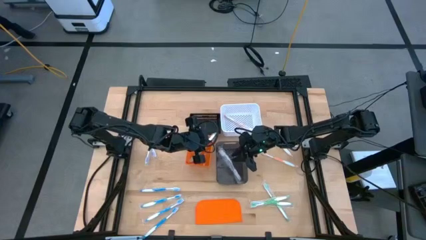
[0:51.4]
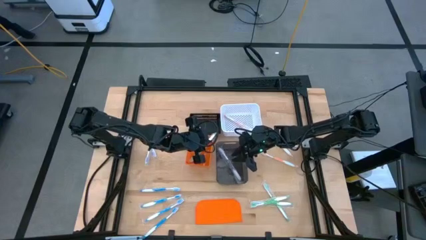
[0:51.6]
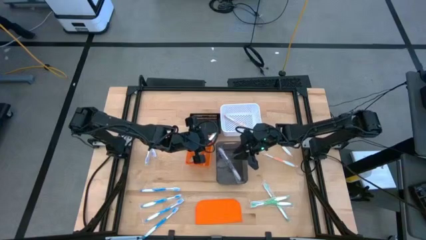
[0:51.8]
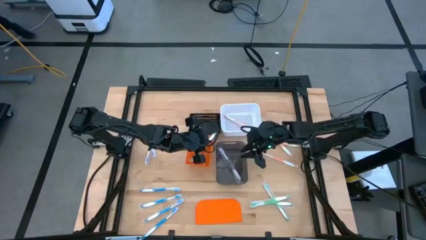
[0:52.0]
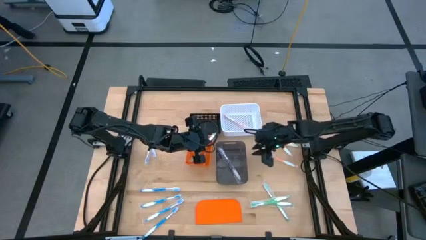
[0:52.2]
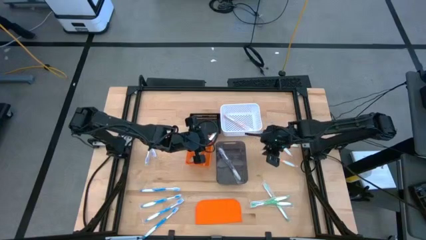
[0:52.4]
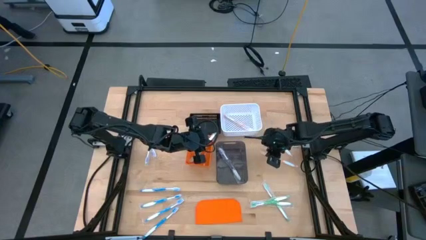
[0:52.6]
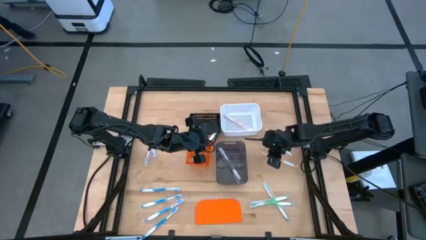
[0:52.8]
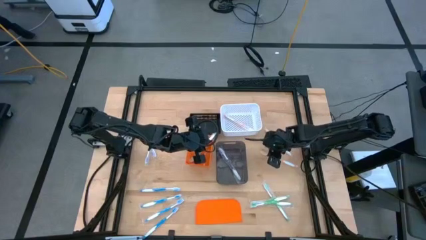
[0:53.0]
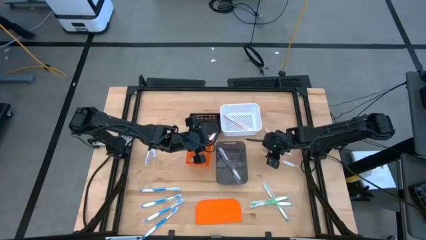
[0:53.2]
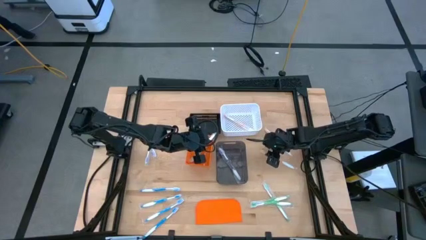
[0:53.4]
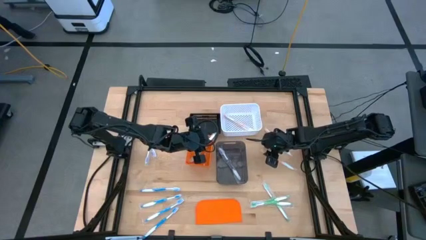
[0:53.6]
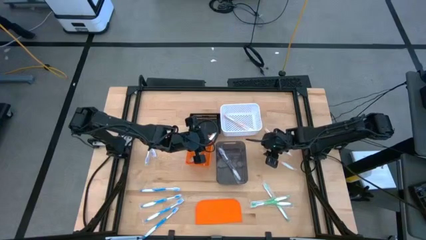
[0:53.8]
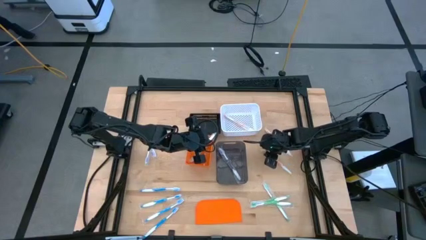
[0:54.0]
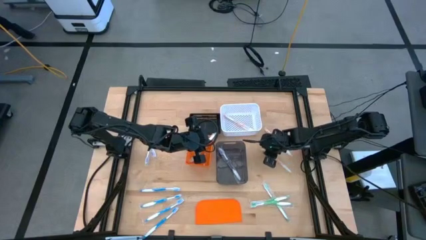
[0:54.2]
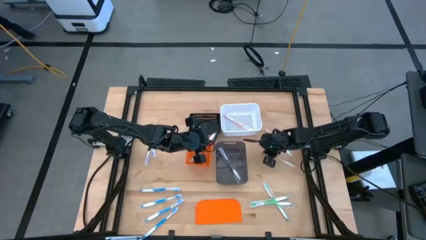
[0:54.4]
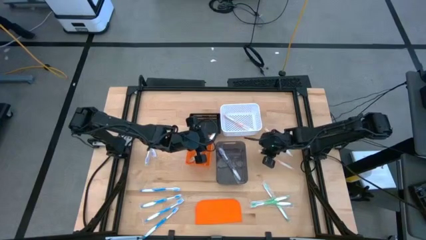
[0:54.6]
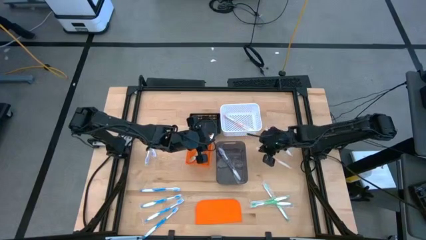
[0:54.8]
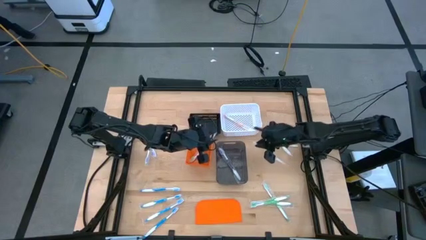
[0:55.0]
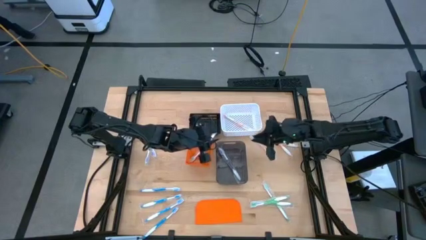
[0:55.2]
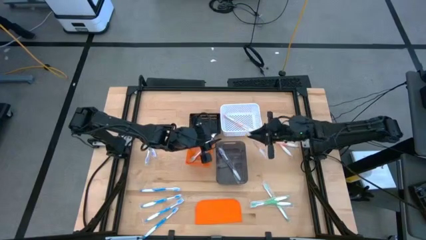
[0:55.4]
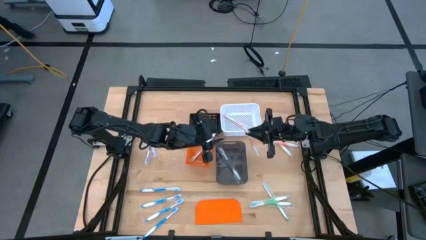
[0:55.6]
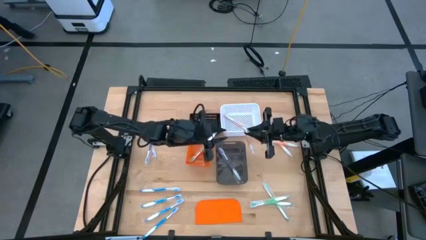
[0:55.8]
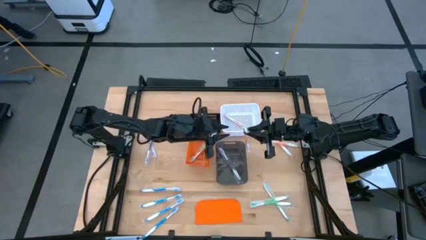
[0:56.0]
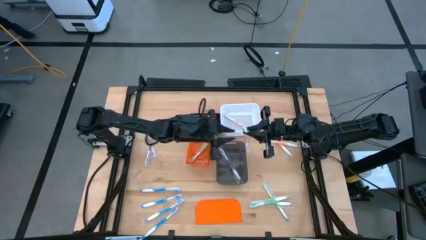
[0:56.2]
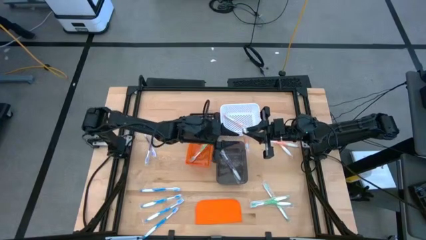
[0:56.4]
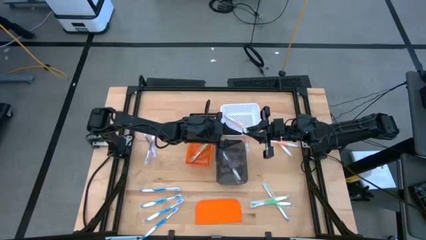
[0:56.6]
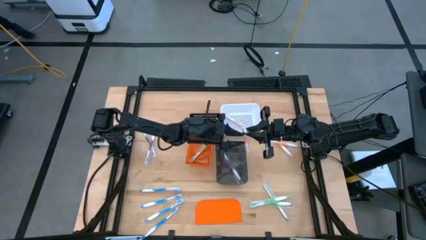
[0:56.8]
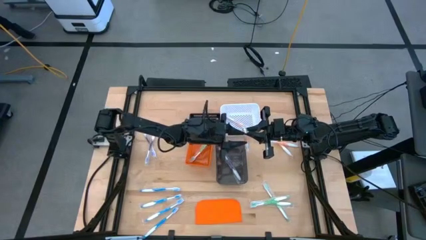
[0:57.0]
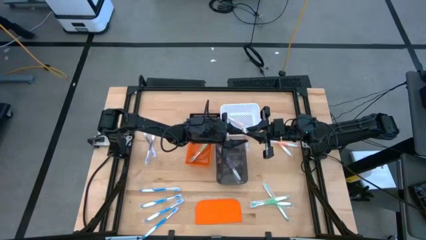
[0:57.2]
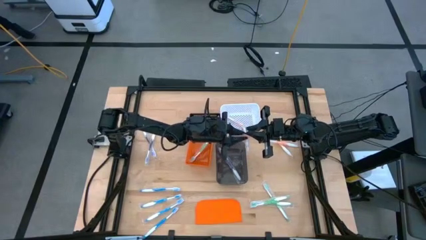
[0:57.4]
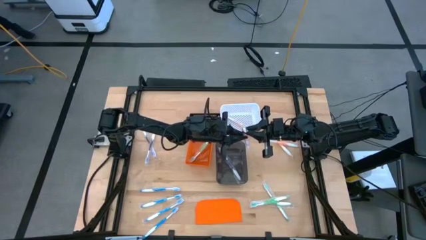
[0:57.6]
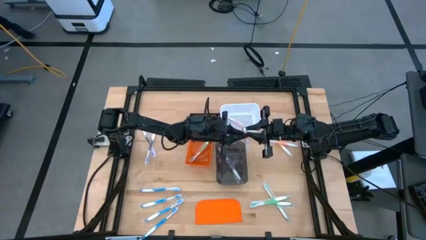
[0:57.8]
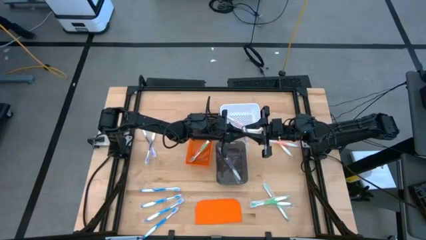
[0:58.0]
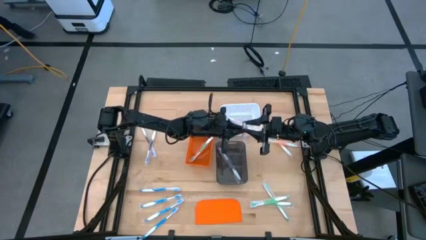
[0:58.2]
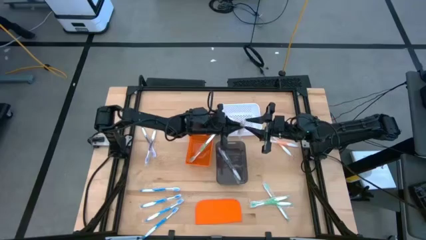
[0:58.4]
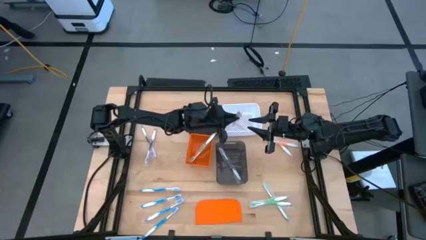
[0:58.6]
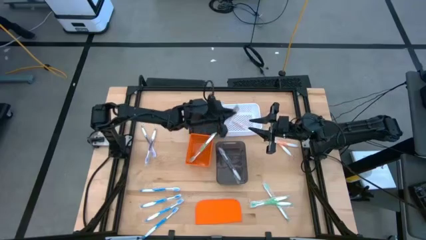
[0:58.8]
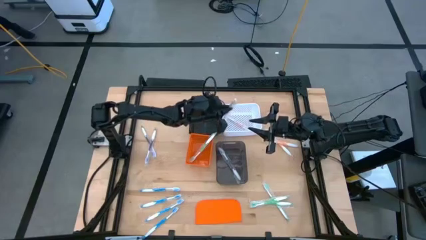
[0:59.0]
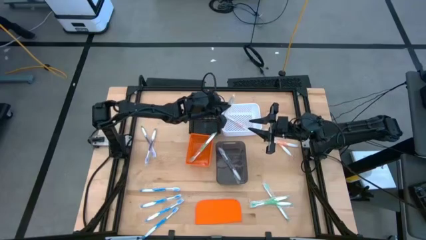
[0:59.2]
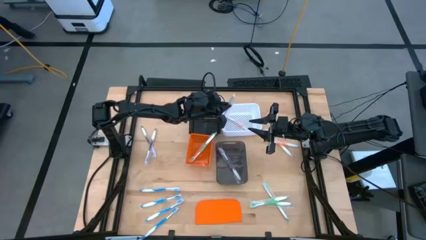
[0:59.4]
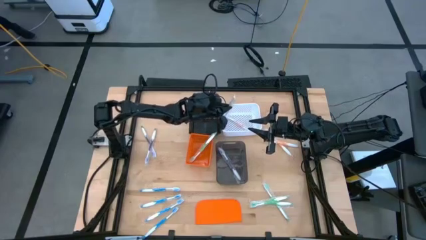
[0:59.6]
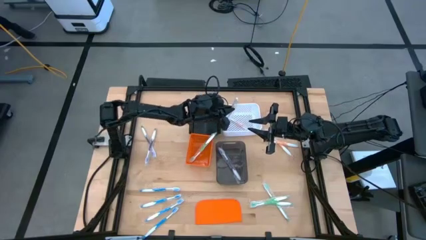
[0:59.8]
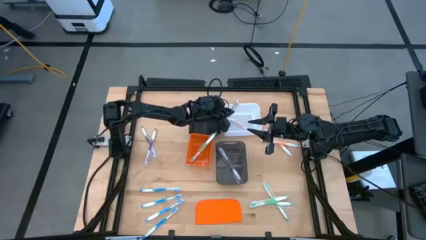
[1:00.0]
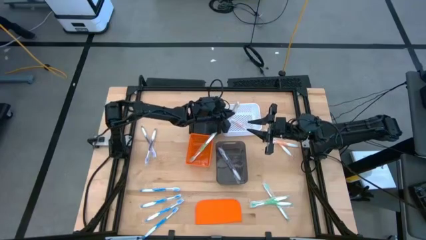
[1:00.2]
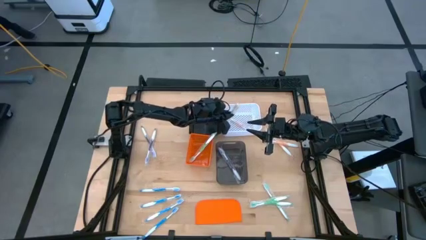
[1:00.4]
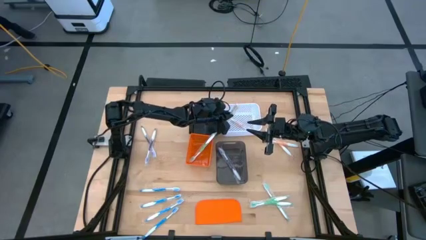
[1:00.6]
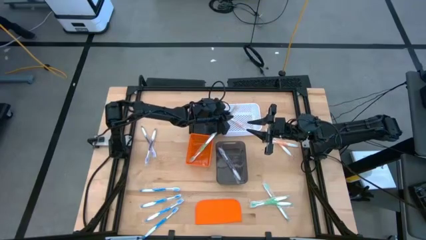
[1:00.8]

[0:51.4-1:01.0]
Task: Pick & Place Toothbrushes
Put the orange toothbrush into the white bin

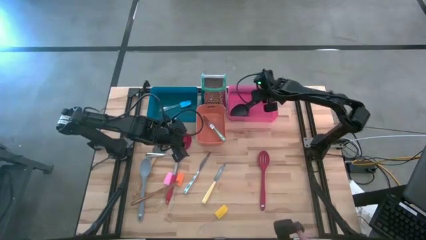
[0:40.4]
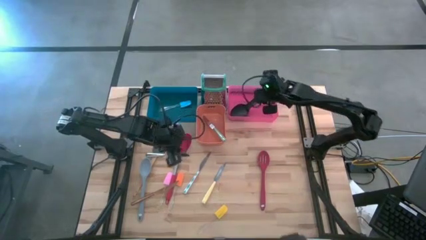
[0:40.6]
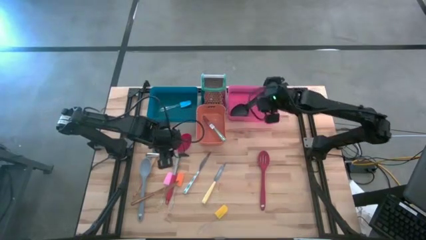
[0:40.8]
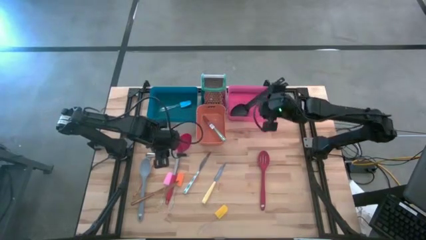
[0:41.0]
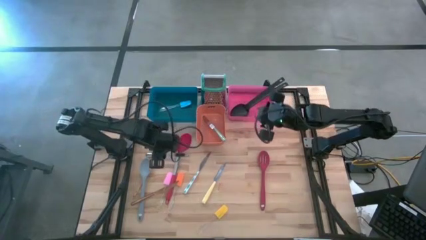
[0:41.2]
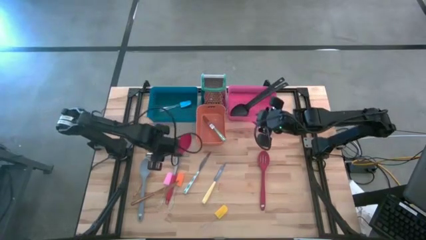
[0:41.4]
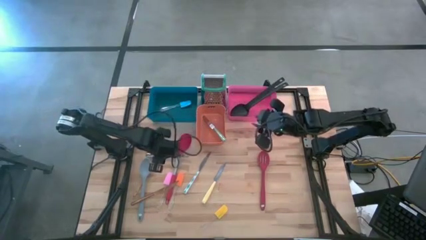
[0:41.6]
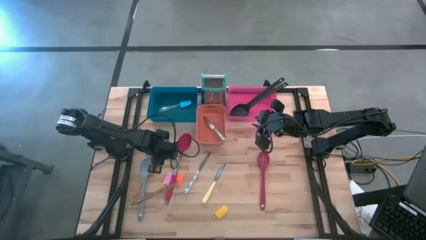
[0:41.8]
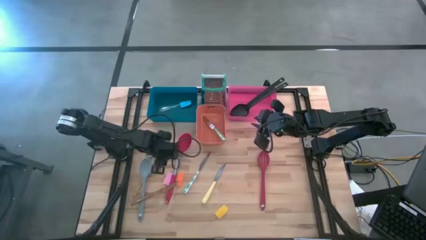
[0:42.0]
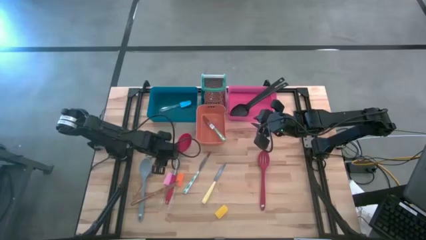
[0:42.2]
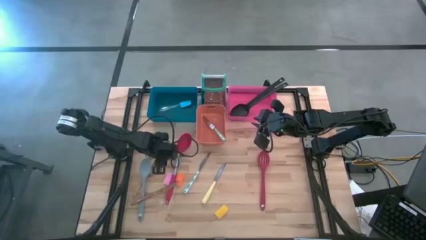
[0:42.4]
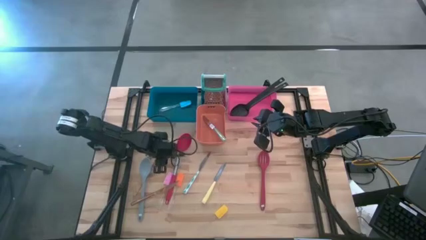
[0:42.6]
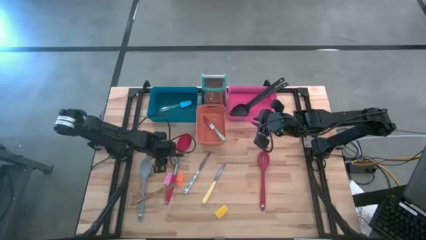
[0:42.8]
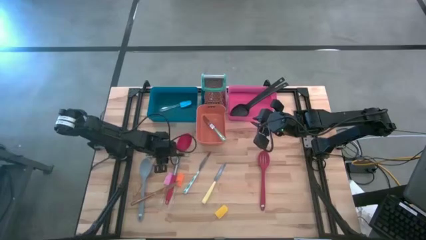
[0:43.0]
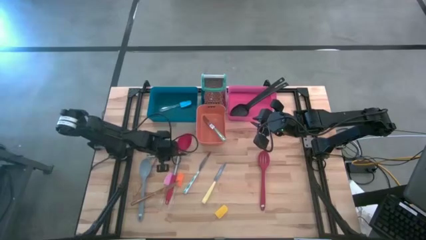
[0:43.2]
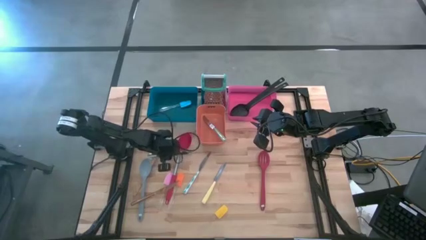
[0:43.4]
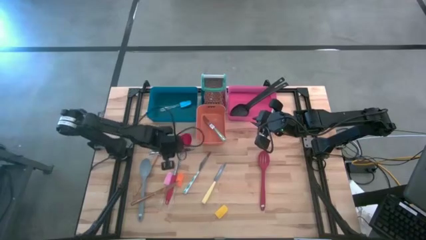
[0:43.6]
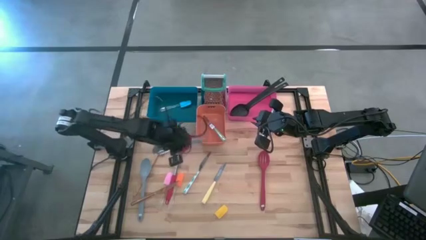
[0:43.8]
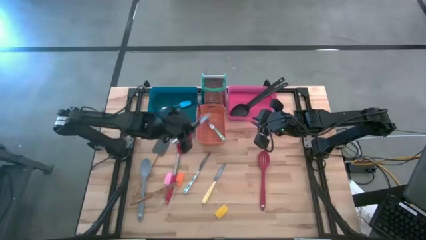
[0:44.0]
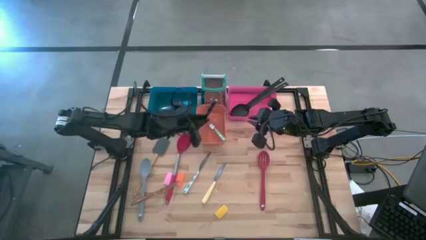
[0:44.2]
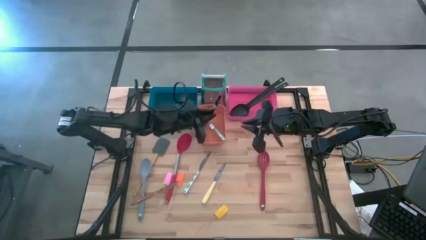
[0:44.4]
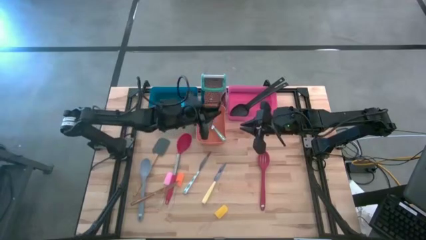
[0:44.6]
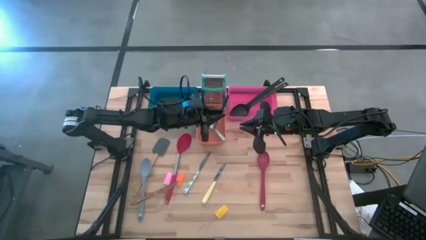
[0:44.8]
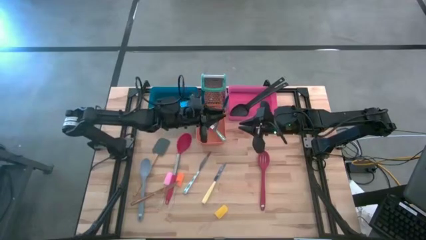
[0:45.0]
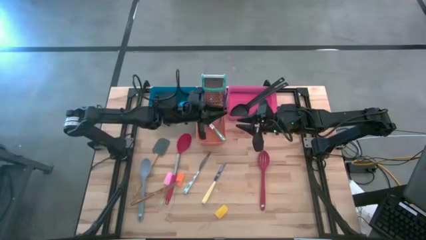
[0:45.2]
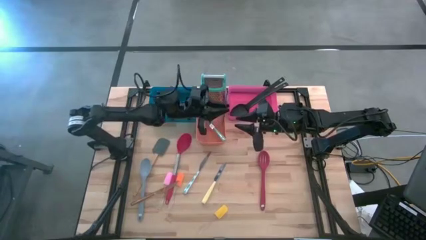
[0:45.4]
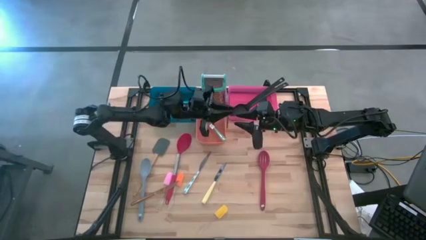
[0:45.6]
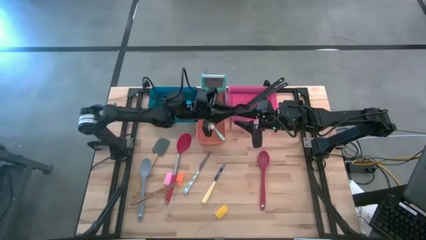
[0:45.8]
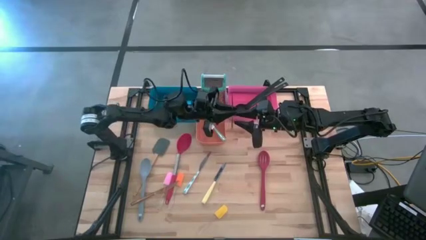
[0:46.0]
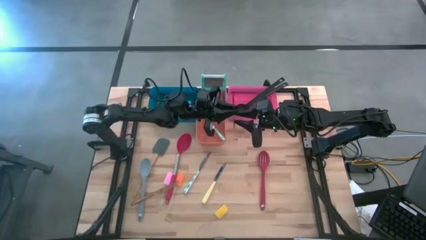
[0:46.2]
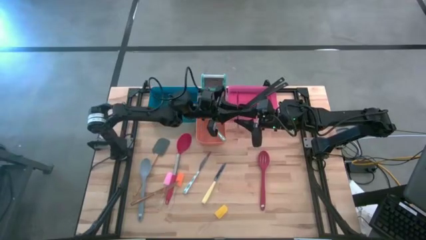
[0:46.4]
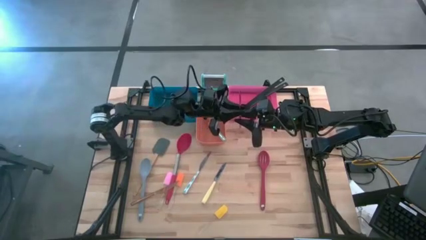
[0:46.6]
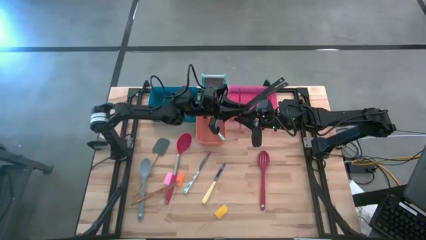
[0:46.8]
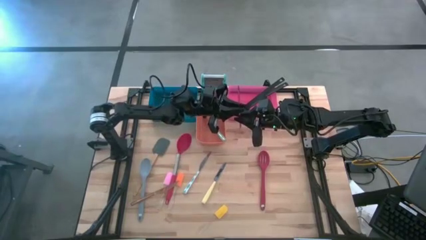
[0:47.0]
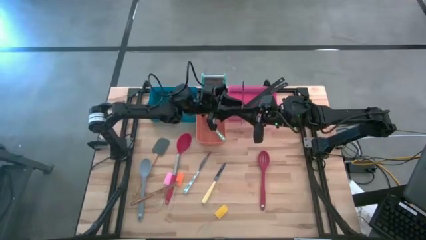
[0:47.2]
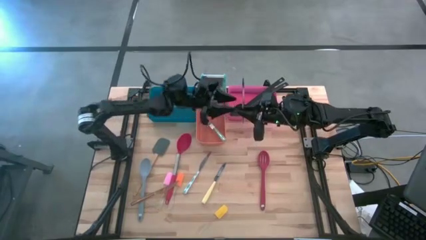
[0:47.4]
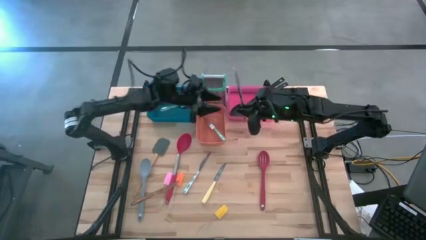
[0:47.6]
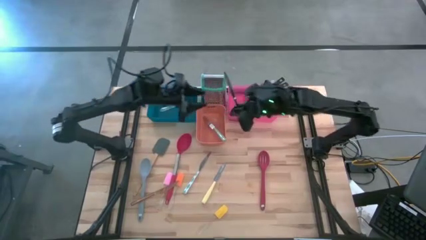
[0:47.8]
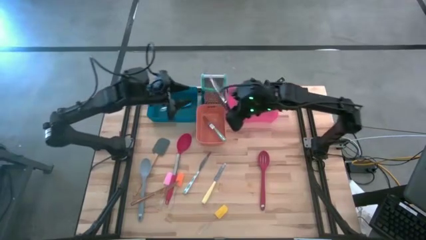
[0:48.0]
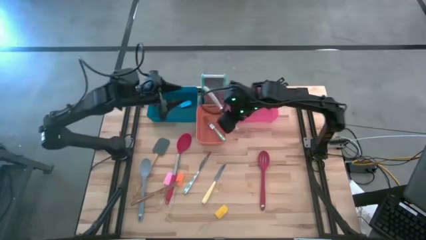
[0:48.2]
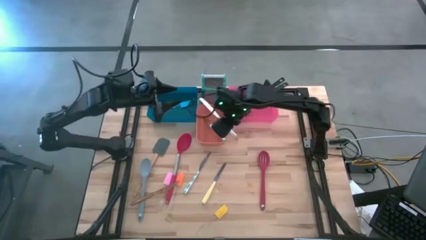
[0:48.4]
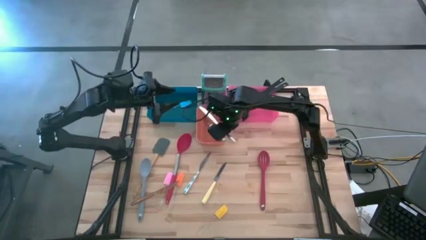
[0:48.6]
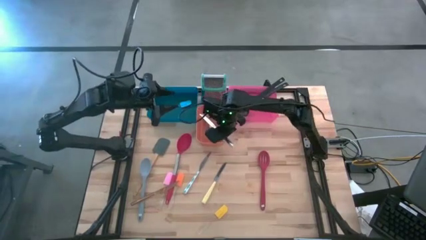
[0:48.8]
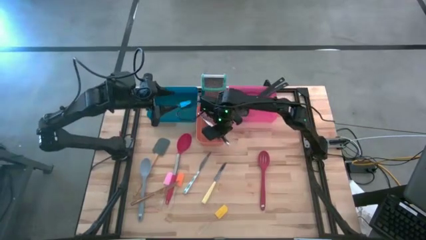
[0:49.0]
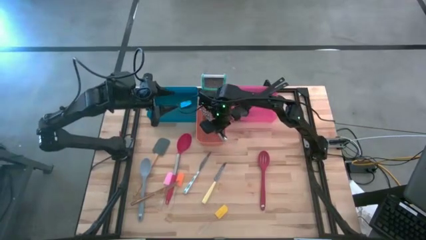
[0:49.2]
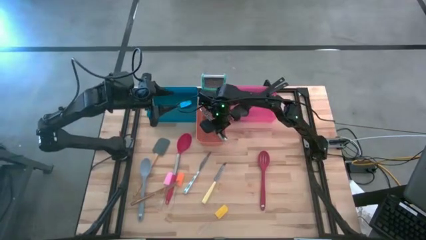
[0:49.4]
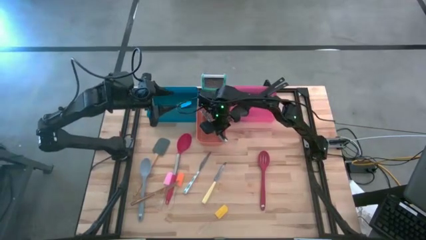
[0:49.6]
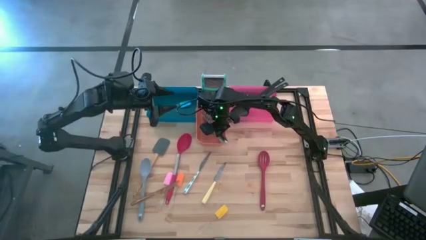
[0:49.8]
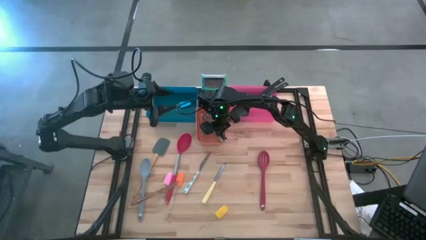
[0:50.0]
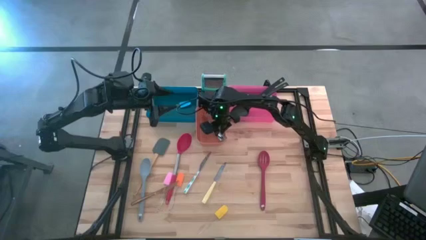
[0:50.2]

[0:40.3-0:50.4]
Task: Pick & Place Kitchen Items
Put the silver table table knife into the orange bin
